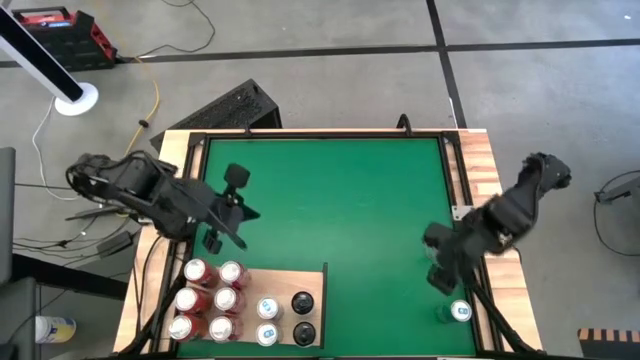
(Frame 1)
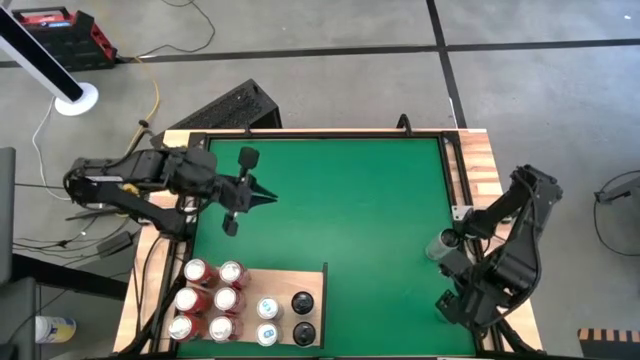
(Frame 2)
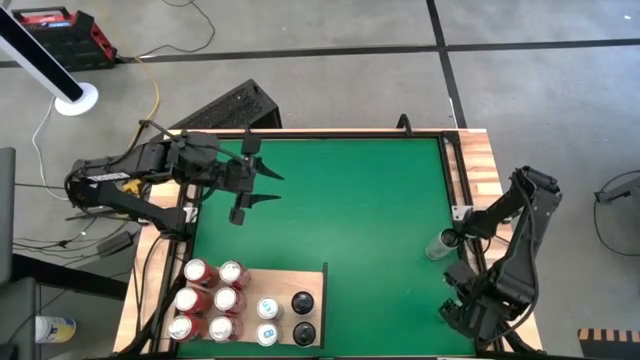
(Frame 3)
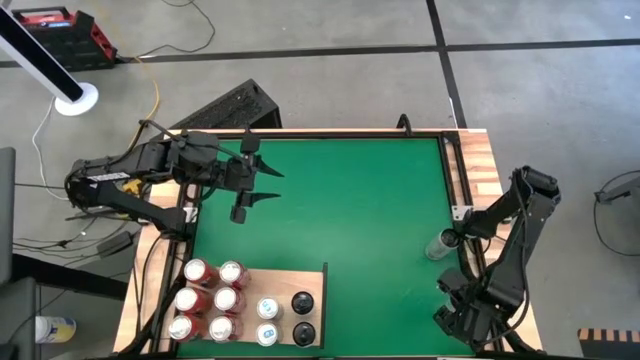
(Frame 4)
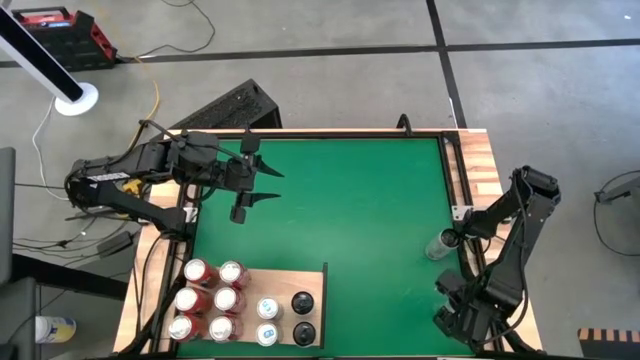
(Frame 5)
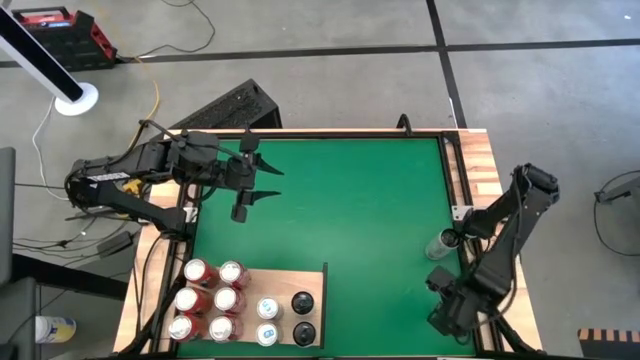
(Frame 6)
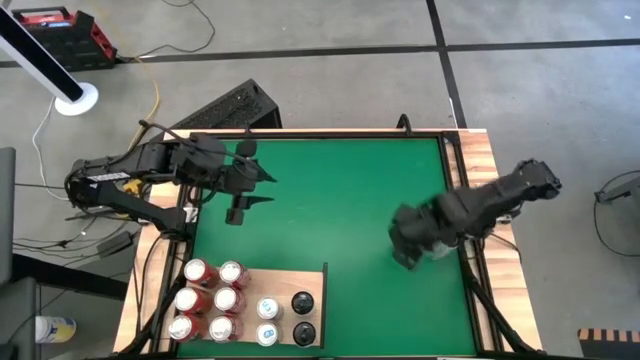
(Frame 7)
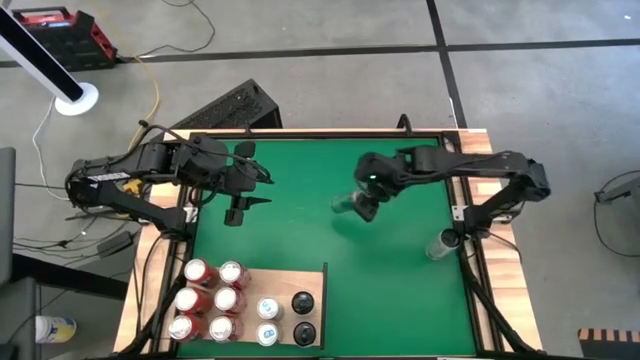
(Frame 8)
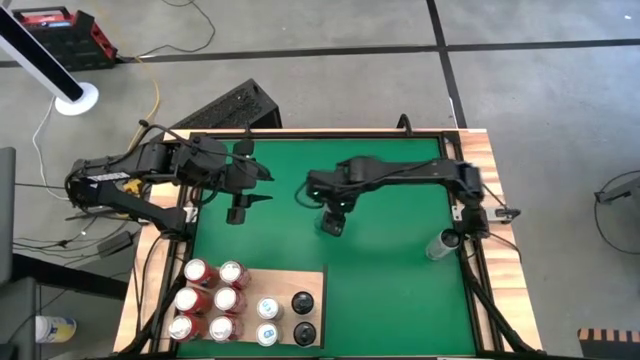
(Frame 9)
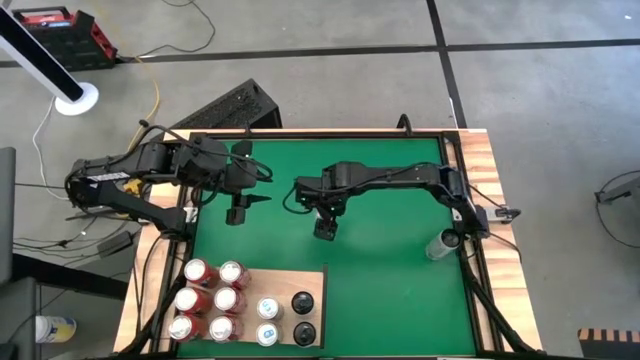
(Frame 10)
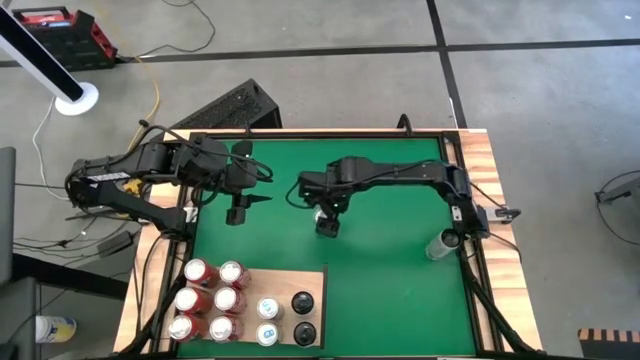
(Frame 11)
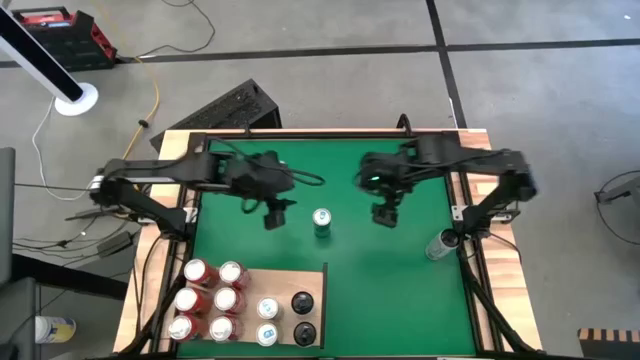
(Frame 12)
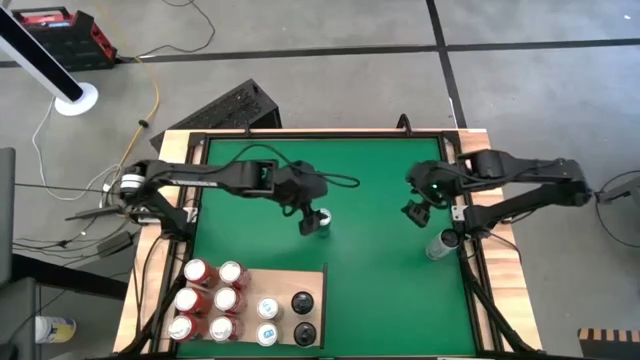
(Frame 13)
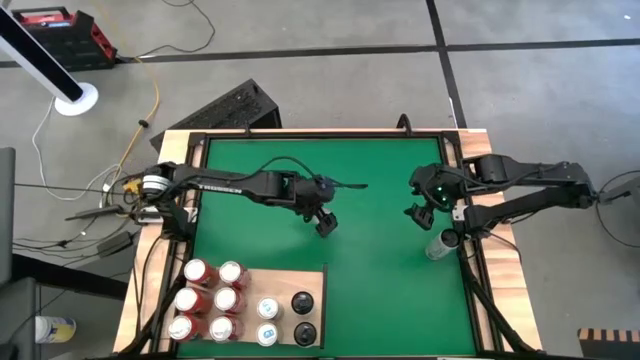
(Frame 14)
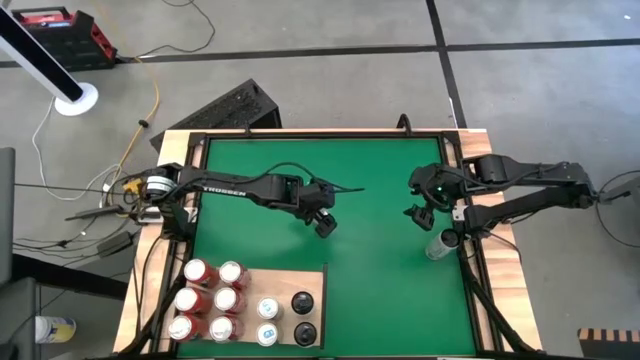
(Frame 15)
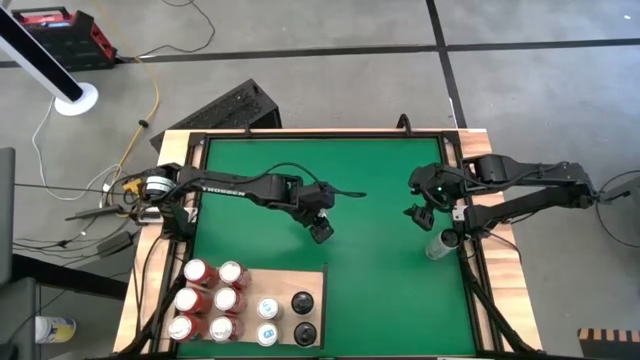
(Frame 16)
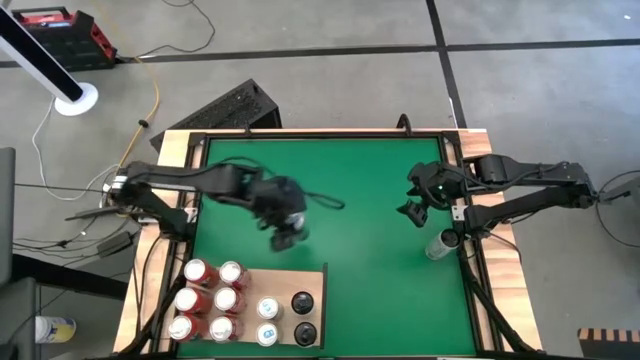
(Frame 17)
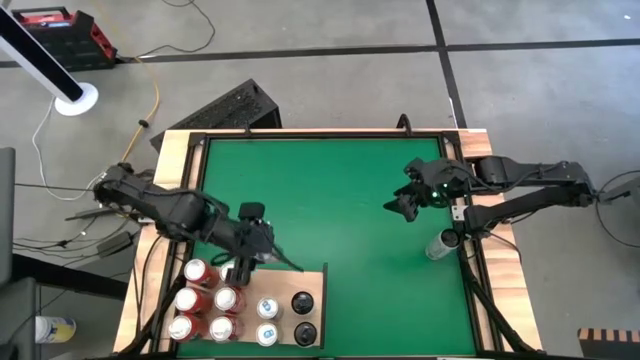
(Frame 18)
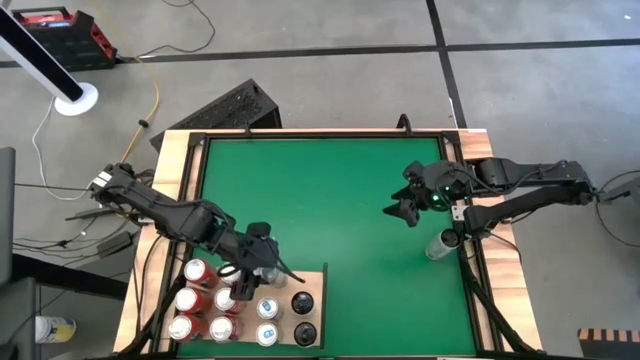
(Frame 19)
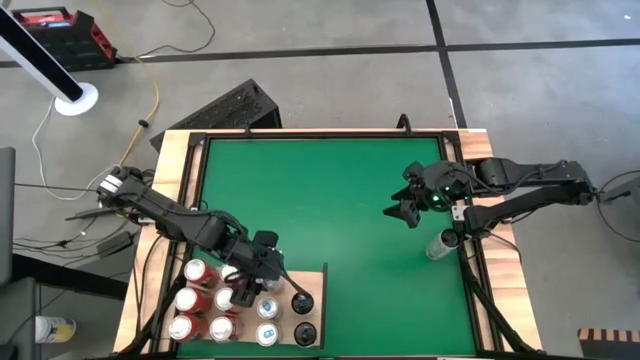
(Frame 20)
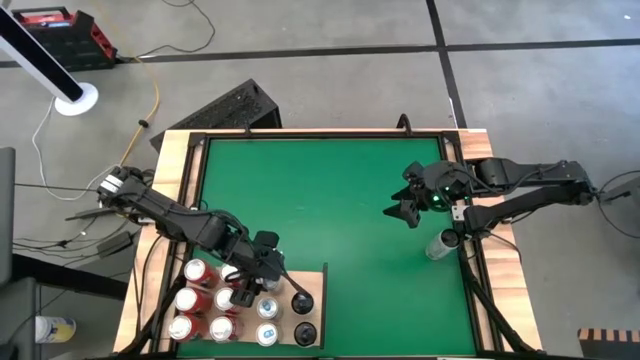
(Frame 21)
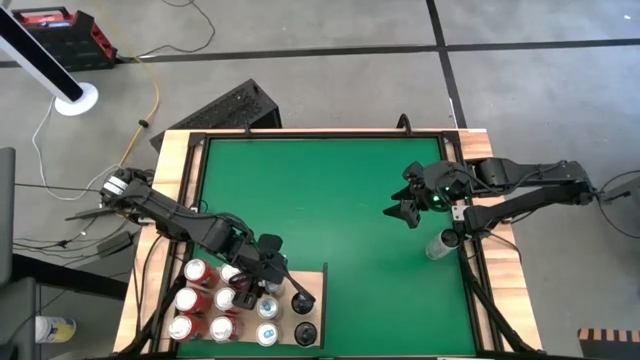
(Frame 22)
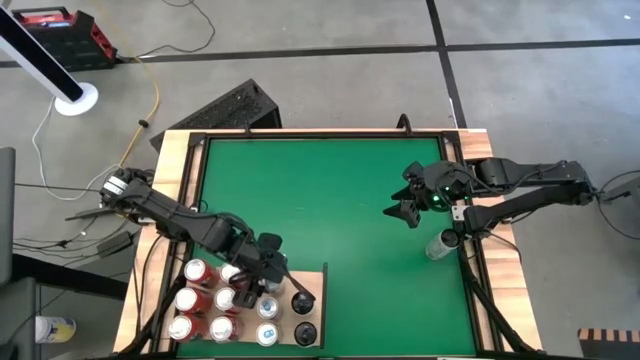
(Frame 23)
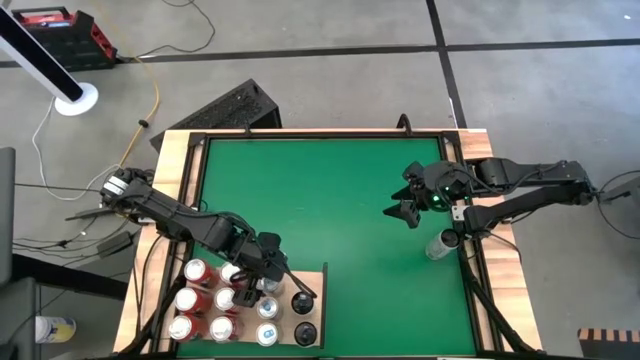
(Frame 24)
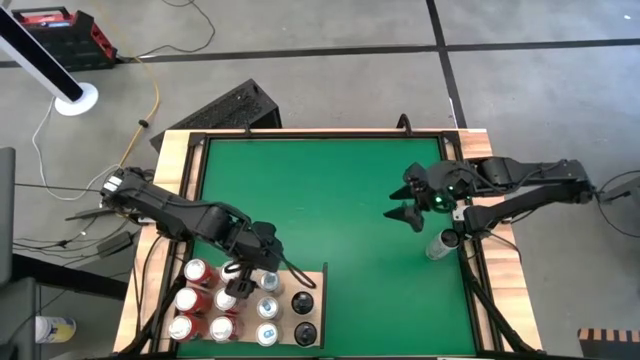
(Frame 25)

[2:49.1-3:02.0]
Task: Place canned beverage on shelf
Put the blue soda can on the shelf aligned with the other blue soda can

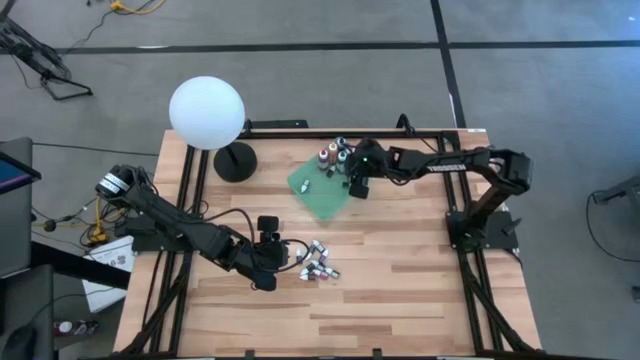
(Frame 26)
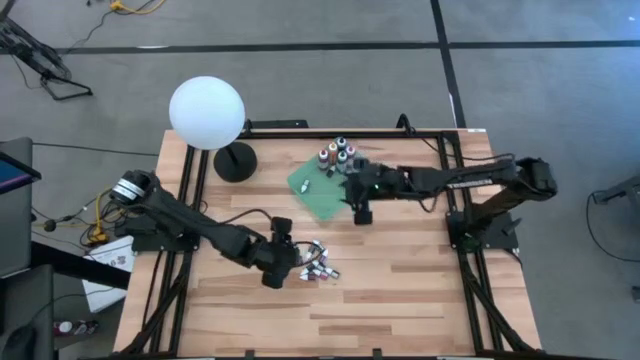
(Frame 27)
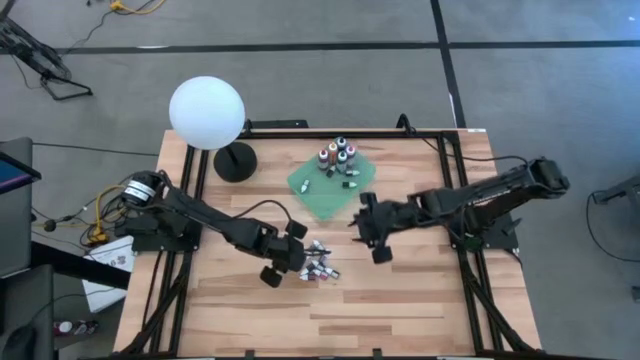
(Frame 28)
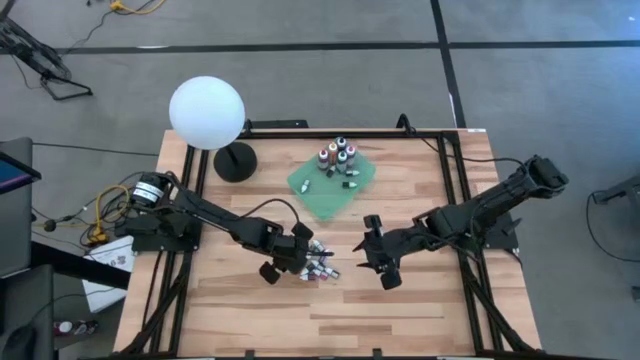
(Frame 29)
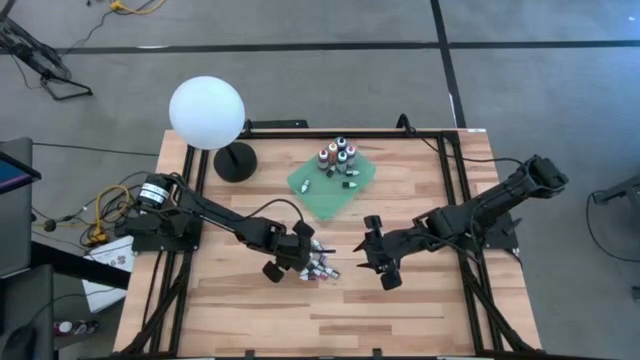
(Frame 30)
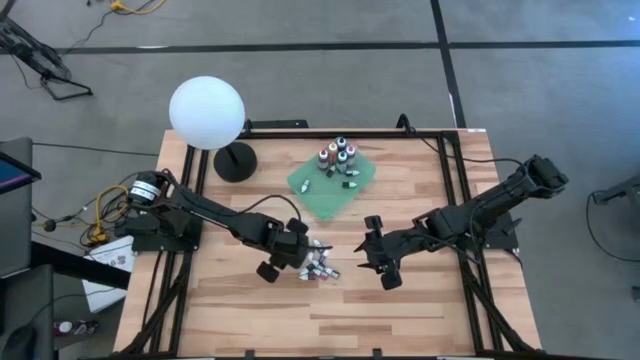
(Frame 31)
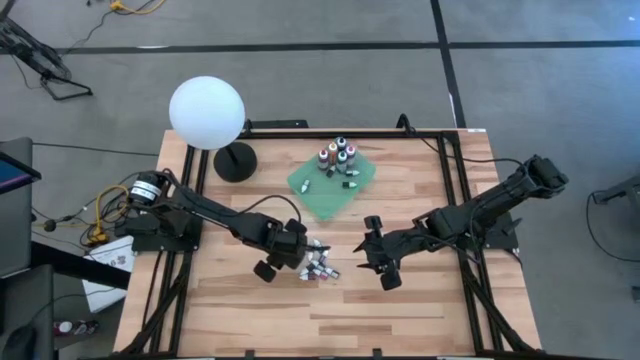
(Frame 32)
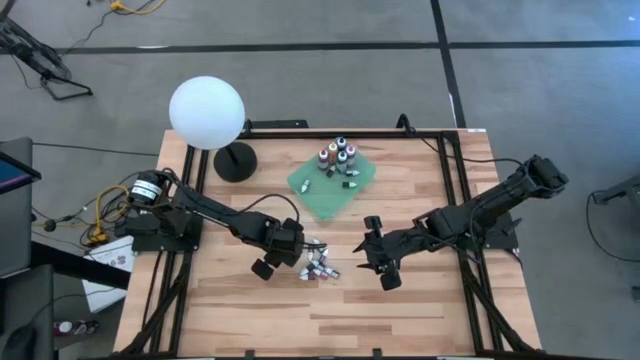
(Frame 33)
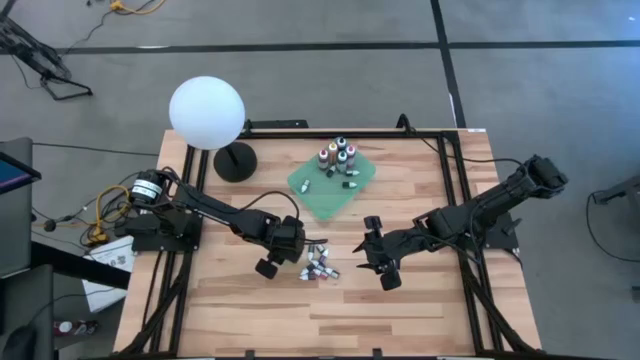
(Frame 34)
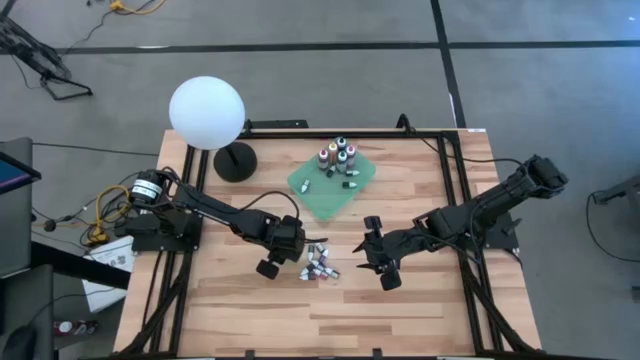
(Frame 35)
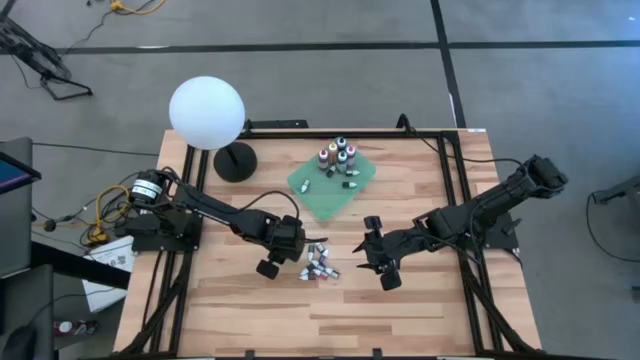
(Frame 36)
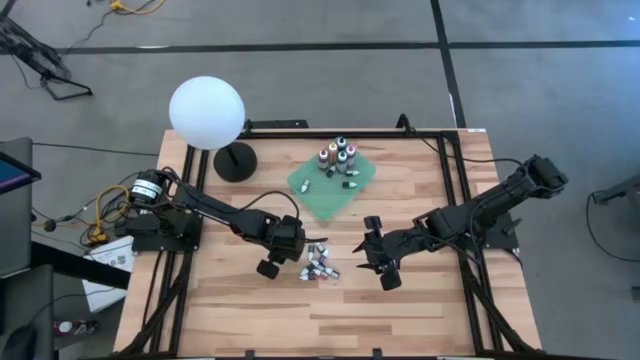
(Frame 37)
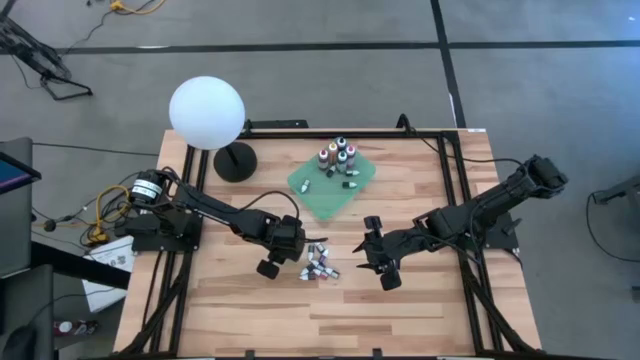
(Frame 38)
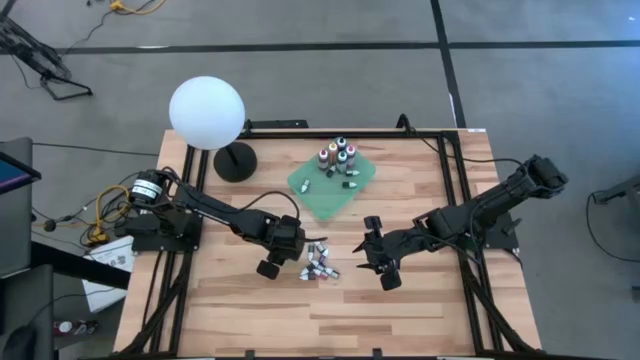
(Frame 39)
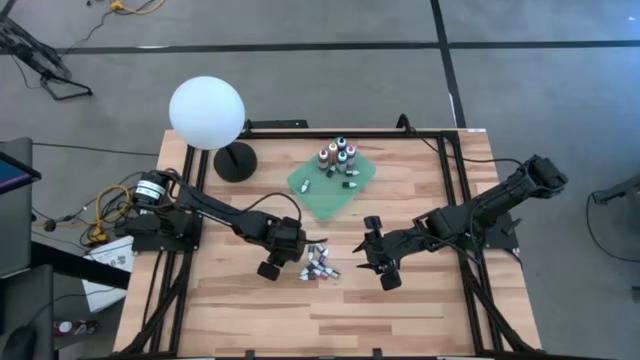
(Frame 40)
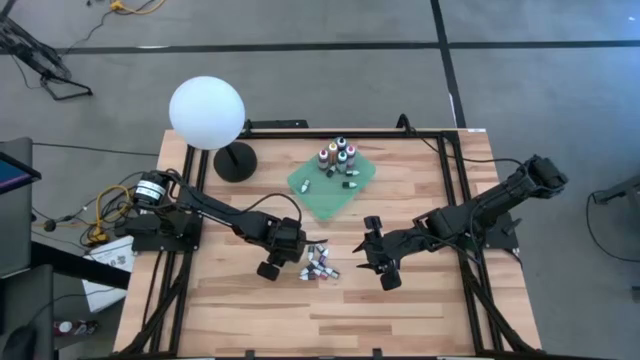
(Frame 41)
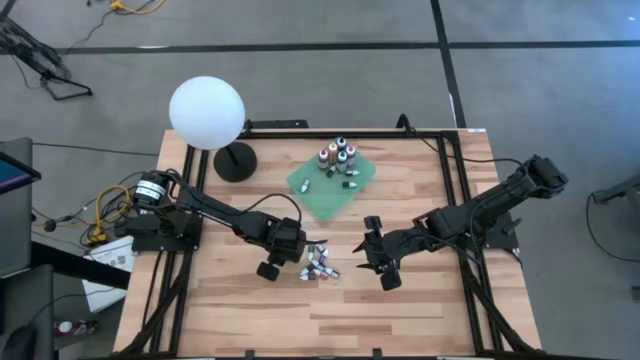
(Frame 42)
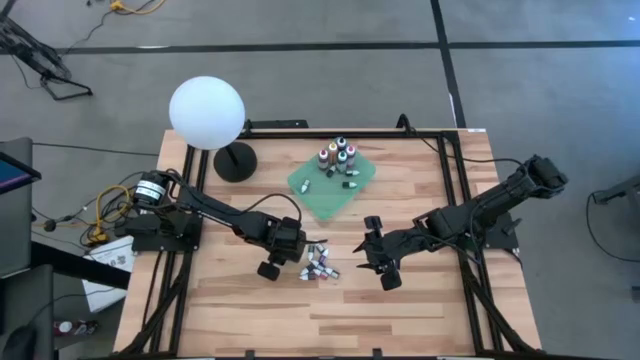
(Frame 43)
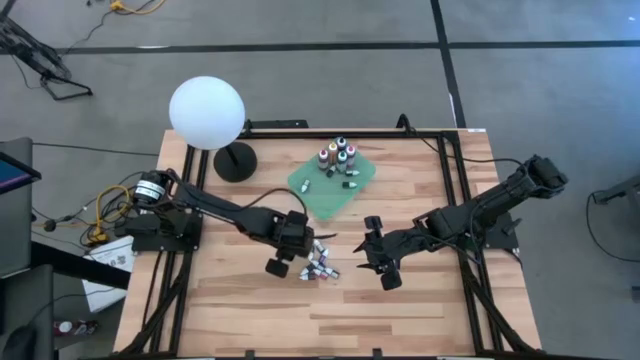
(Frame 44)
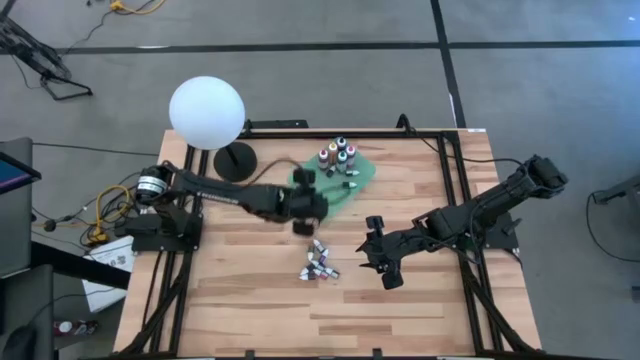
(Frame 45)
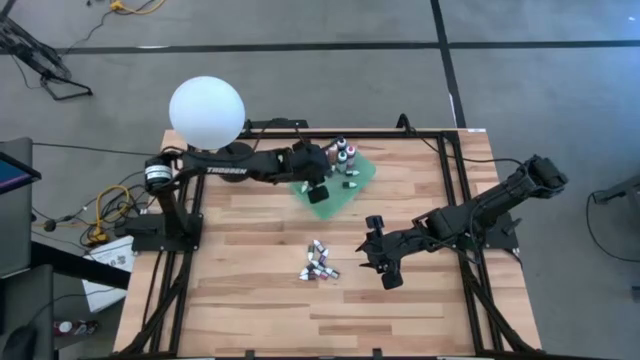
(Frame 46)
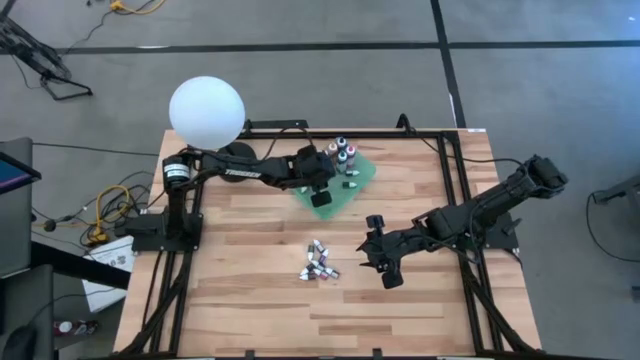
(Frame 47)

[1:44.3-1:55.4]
Task: Pick & Place food coloring
Put the left purple food coloring bottle into the green bin
